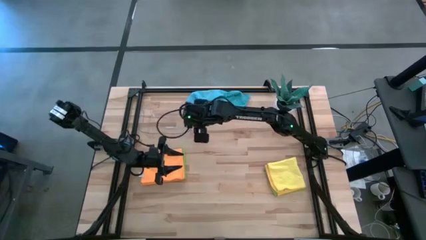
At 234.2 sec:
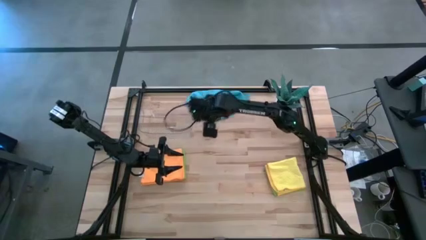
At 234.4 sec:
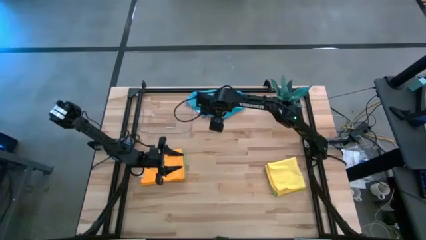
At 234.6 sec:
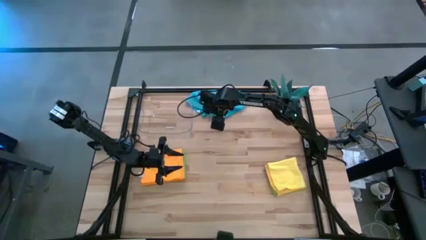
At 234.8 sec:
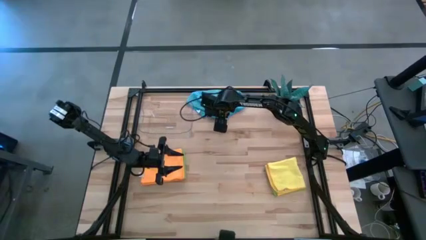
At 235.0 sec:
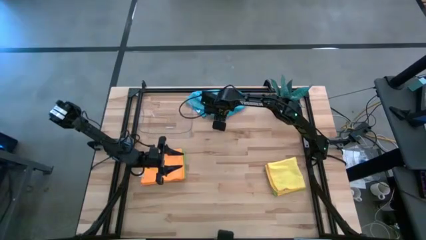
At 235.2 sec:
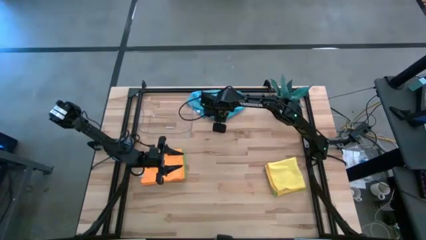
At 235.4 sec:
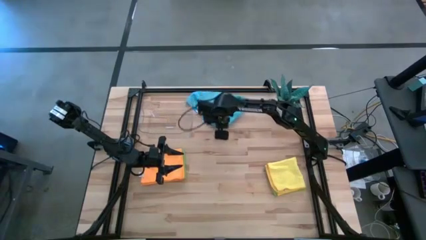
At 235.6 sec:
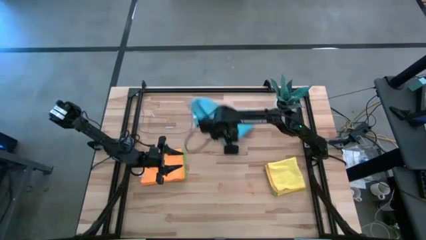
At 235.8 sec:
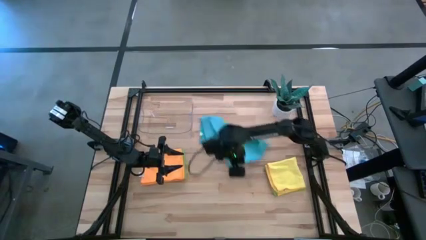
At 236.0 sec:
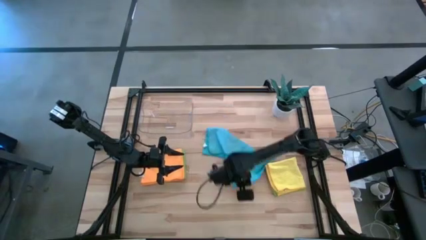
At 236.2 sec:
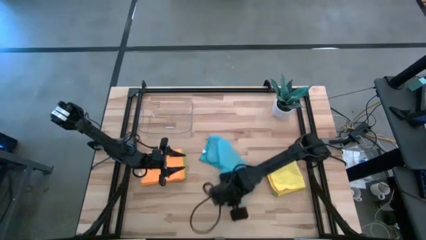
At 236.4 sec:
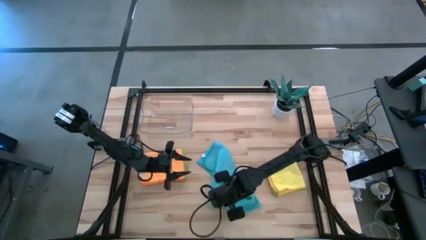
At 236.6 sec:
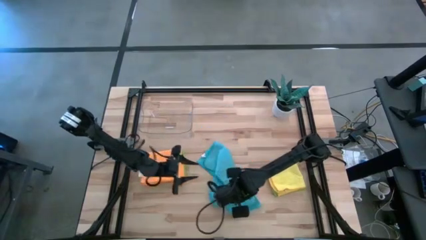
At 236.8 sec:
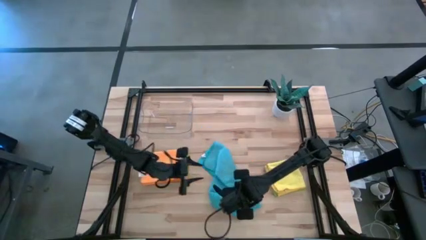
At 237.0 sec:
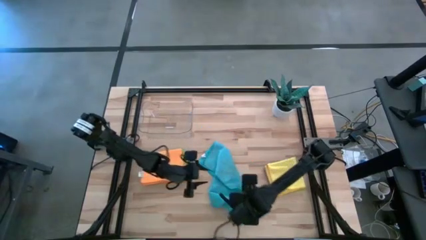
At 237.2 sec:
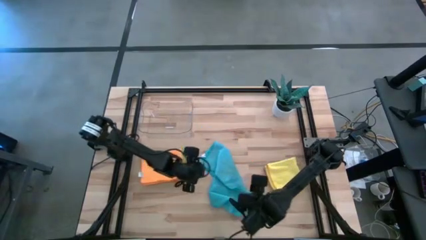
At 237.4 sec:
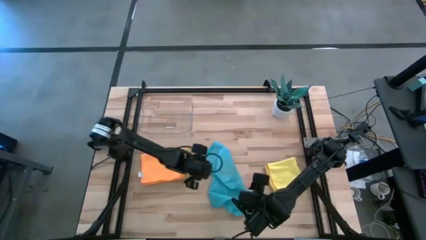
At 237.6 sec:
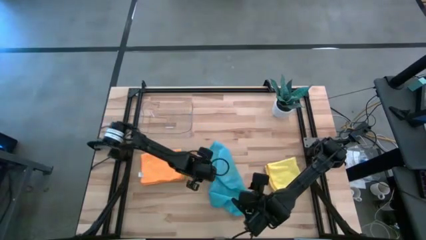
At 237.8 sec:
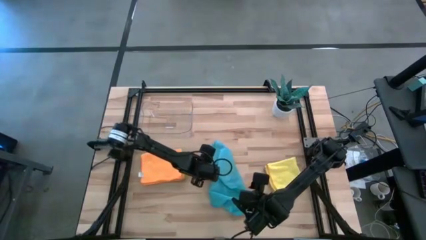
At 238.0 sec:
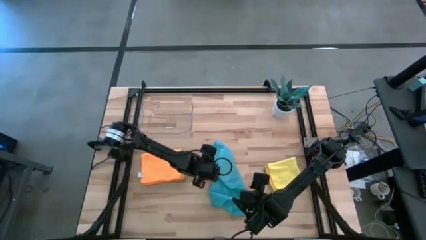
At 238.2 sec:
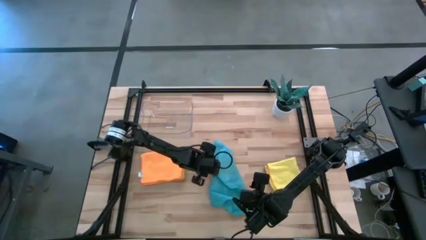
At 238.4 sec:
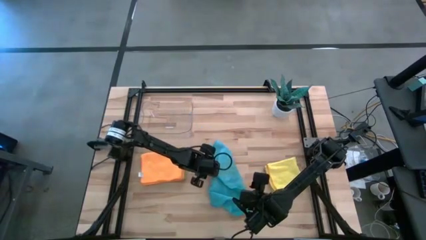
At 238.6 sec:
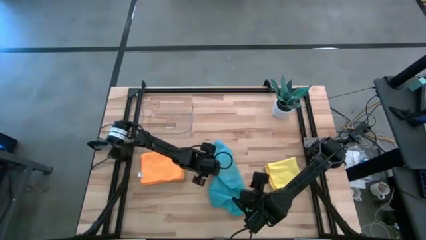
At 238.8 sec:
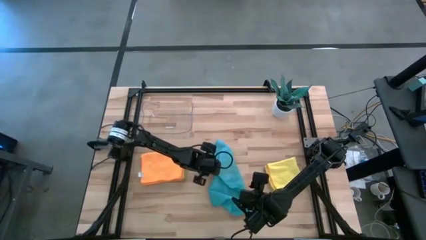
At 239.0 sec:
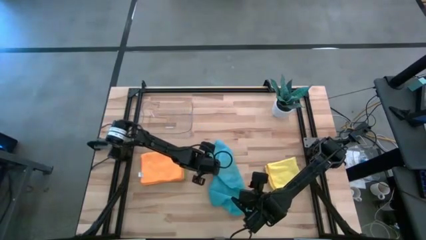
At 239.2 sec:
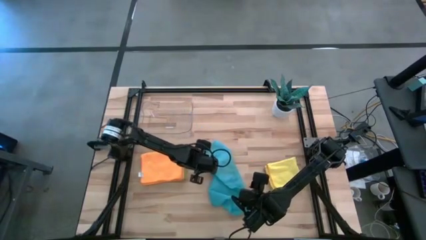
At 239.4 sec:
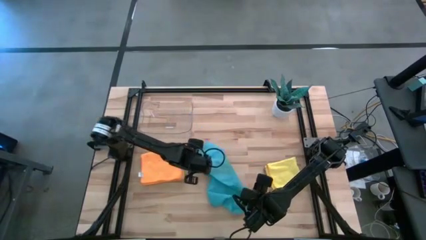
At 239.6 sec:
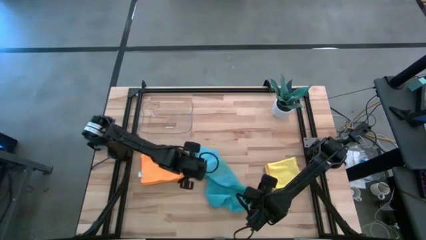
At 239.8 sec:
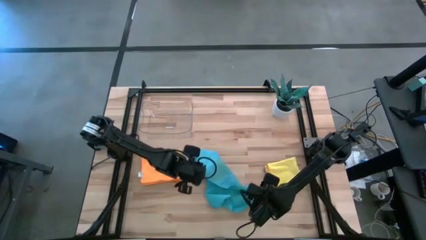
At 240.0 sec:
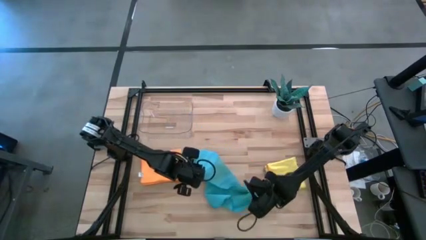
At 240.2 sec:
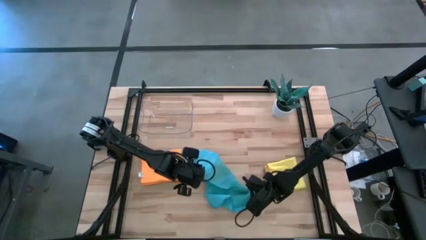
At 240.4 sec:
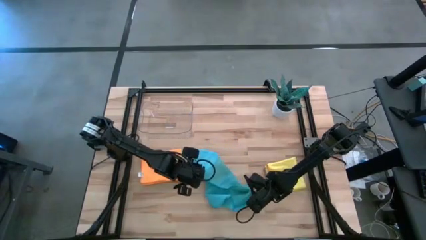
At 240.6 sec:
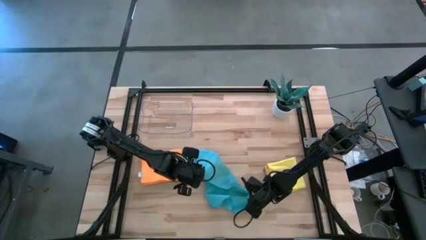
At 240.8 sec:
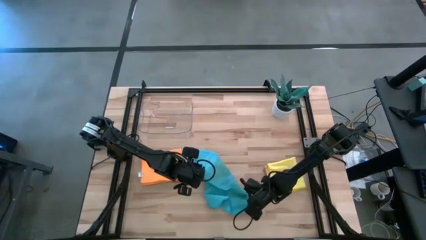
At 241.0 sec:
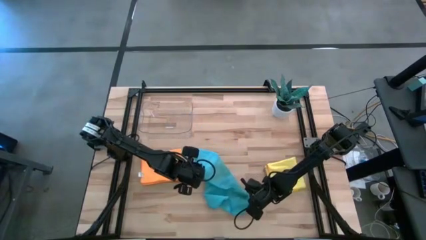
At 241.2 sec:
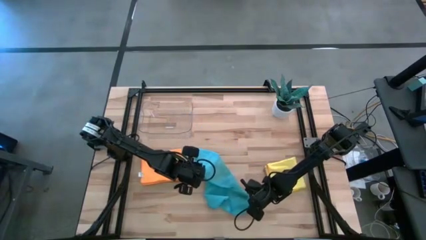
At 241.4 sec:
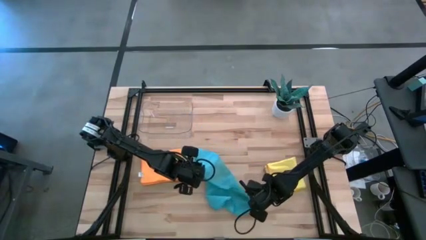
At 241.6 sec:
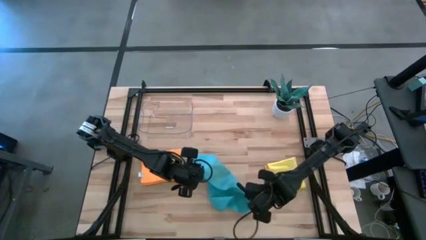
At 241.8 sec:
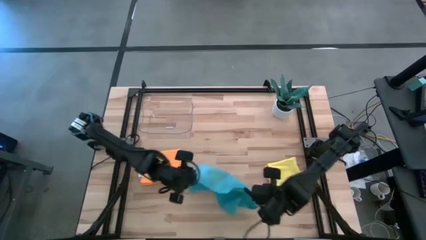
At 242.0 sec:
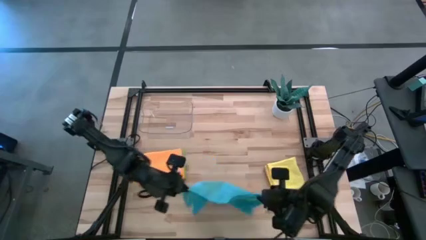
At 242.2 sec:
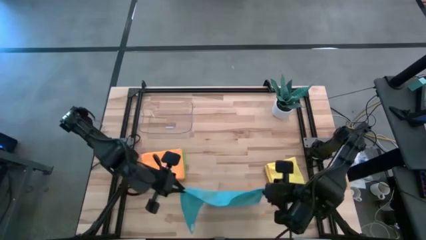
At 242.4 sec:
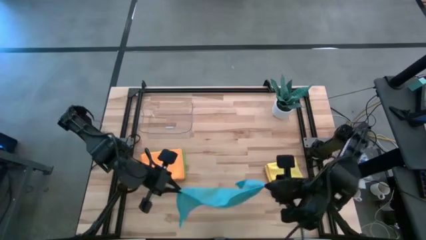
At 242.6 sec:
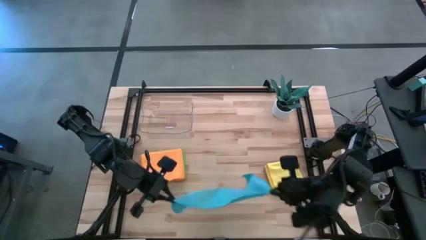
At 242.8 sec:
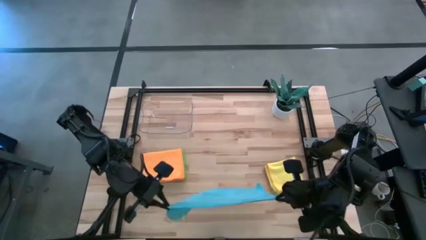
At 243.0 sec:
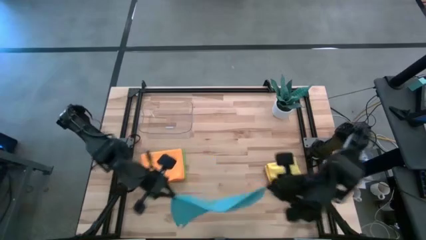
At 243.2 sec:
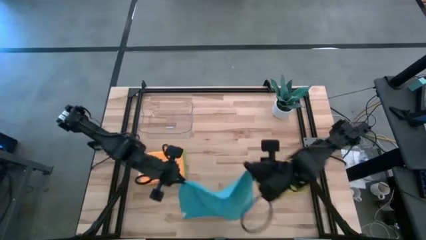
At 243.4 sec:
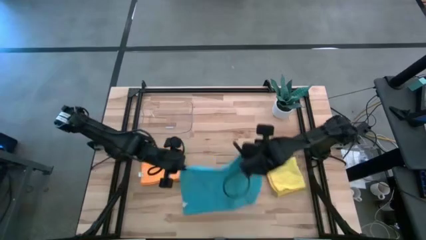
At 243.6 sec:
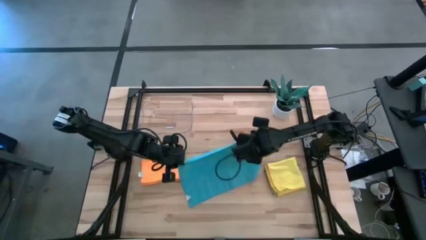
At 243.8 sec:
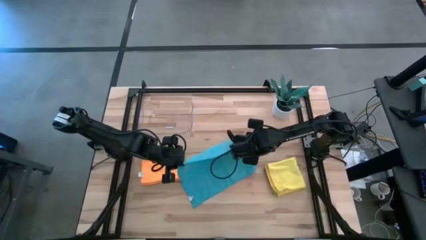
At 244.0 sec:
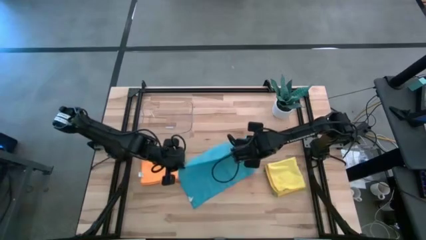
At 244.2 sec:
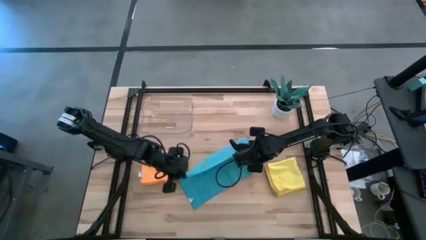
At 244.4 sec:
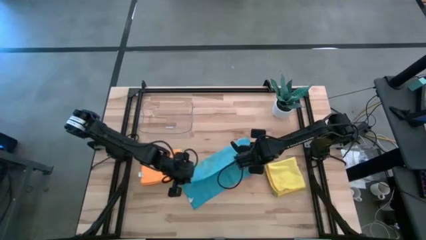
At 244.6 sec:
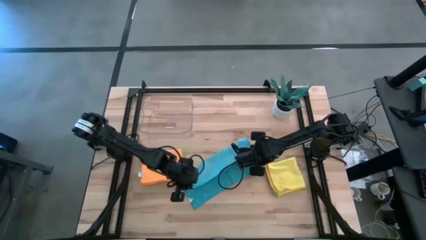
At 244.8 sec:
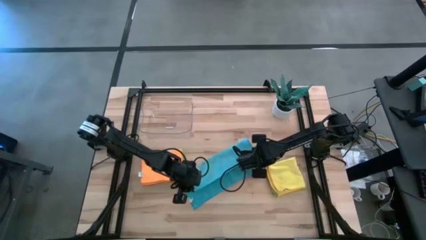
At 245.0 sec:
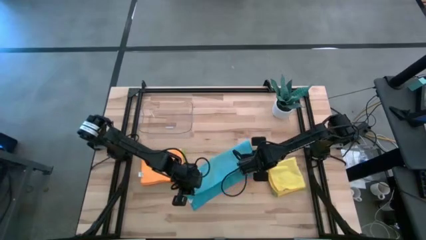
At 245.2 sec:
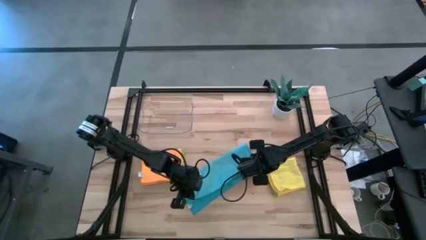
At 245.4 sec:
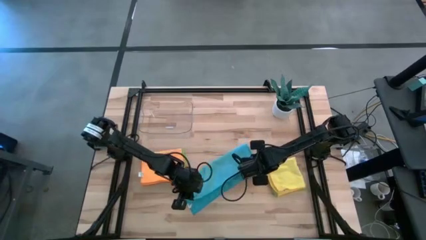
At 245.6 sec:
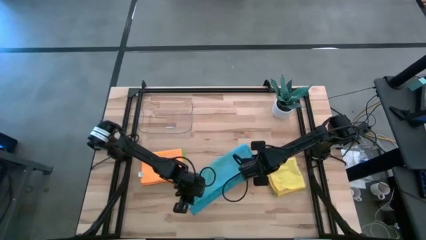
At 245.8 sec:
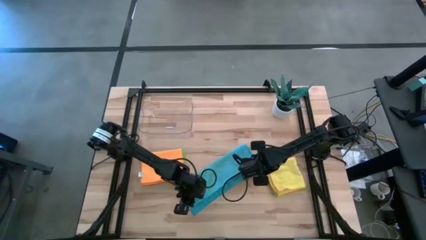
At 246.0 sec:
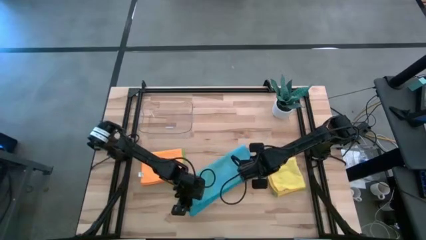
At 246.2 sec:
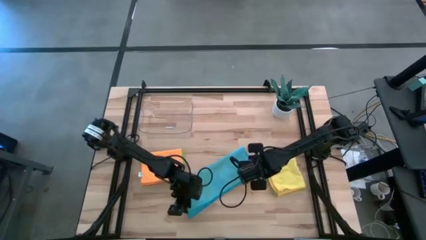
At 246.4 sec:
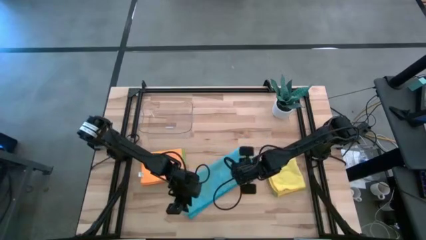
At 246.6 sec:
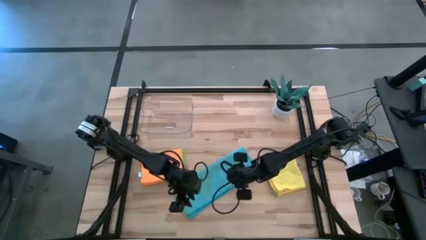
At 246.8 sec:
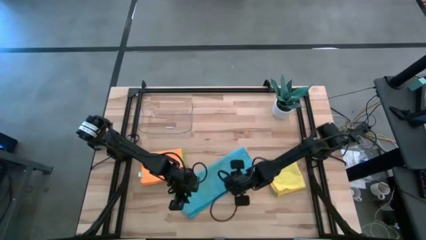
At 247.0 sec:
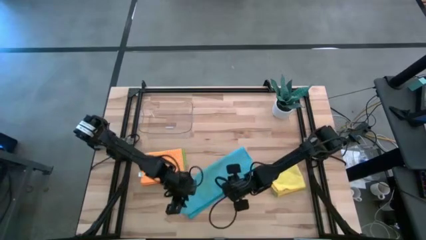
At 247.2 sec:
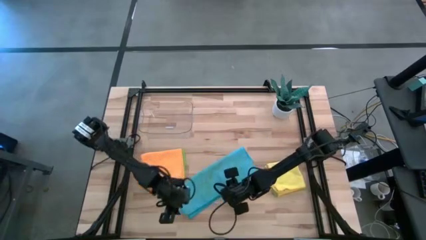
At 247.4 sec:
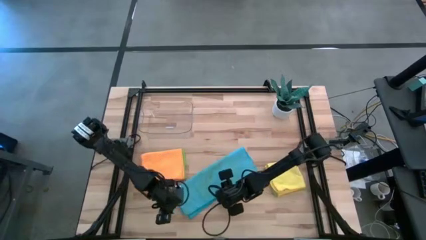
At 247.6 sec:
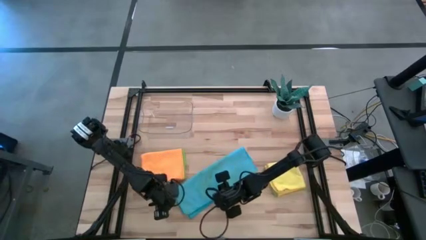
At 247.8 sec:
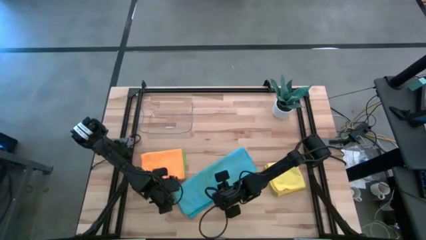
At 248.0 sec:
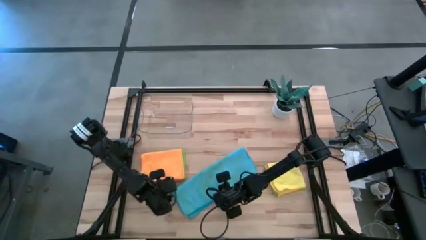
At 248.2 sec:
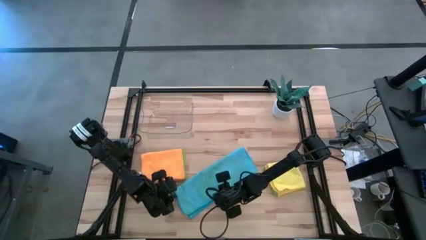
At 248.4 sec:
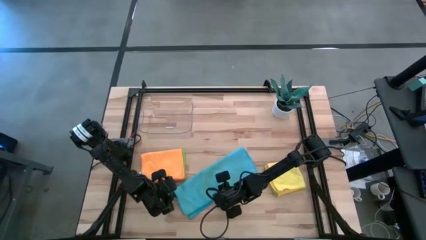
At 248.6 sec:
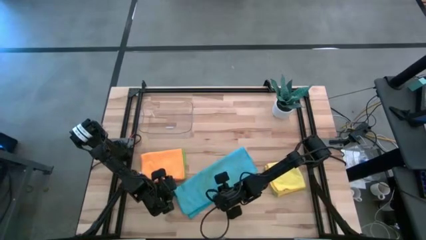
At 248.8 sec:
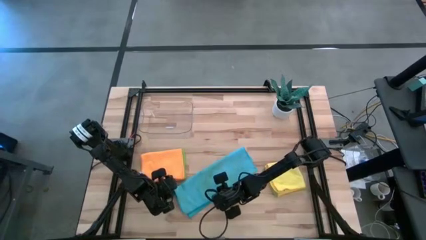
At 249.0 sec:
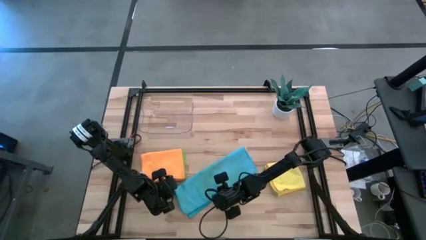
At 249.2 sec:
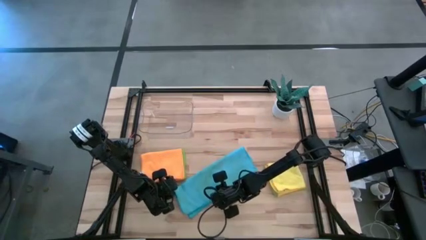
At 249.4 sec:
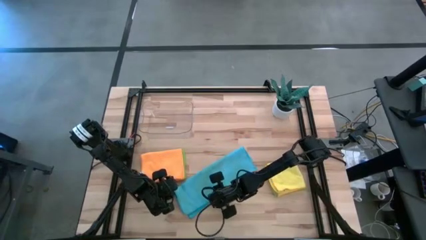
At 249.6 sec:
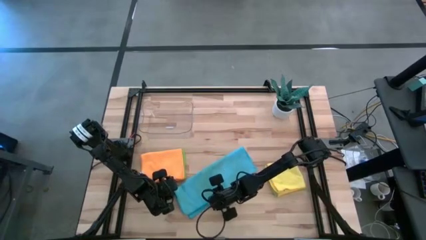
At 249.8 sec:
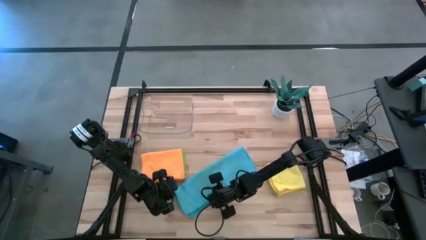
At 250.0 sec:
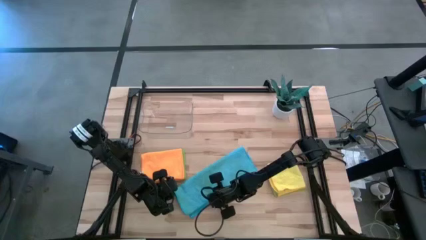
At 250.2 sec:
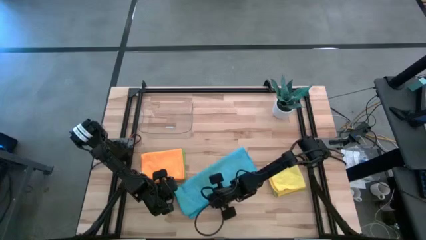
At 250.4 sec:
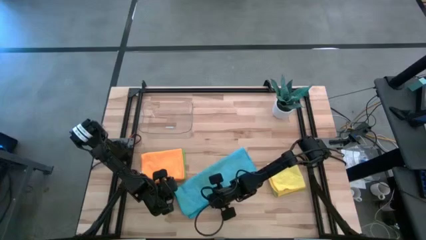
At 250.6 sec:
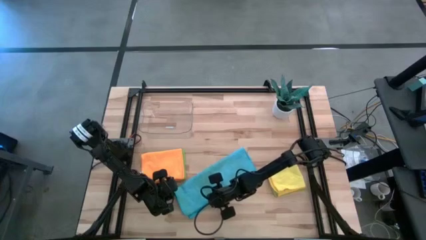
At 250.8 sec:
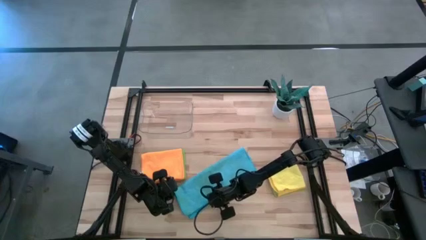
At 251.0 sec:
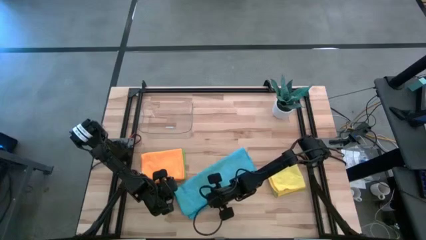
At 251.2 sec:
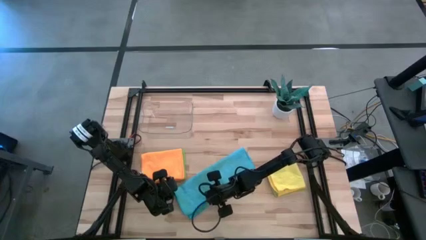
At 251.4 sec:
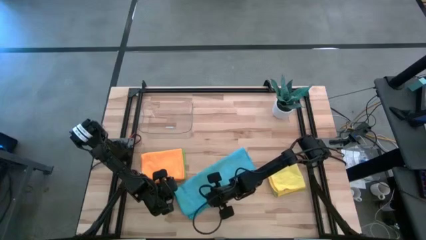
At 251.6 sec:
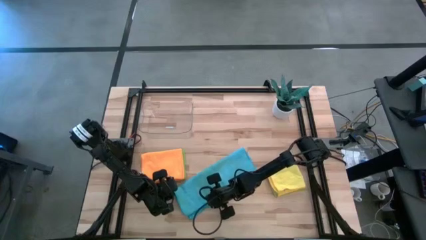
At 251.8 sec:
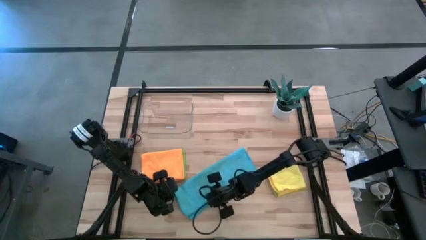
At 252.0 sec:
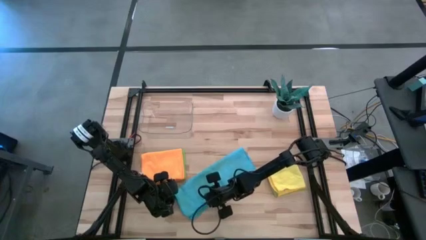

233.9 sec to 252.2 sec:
Task: Fold microfiber towels
Fold the blue microfiber cloth
